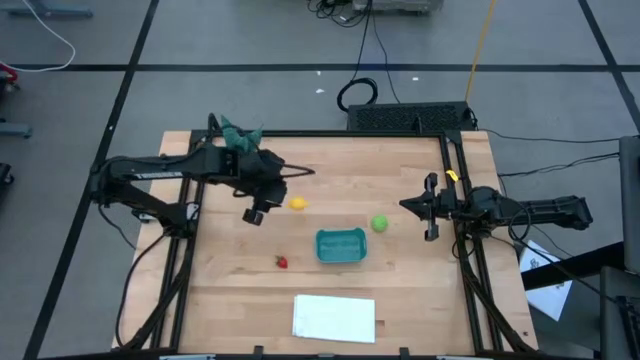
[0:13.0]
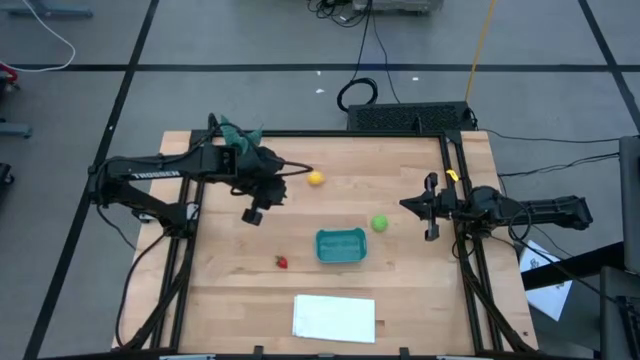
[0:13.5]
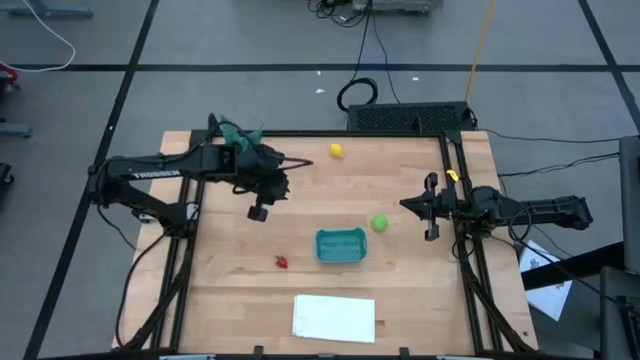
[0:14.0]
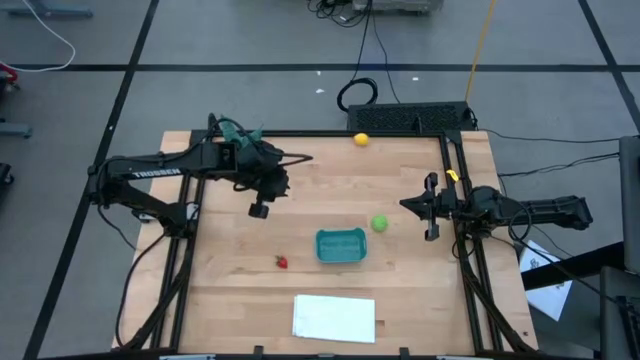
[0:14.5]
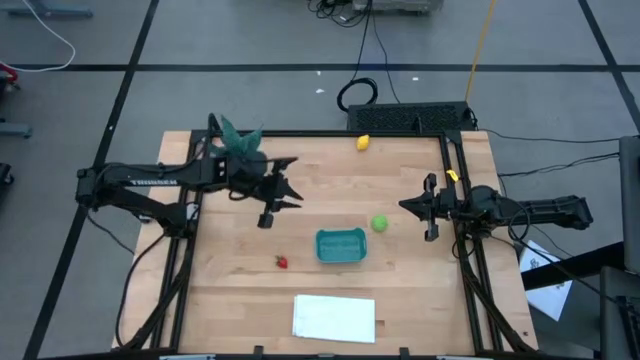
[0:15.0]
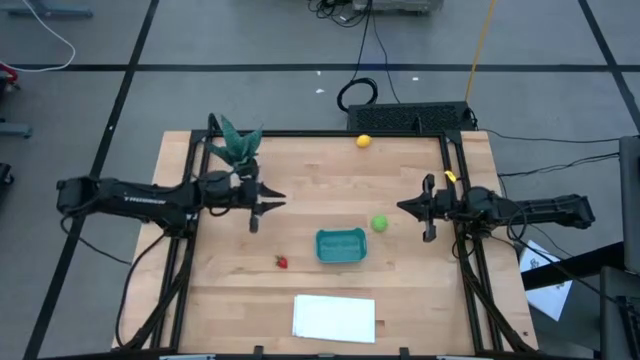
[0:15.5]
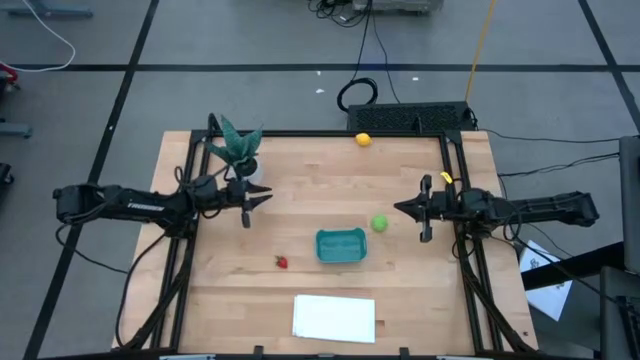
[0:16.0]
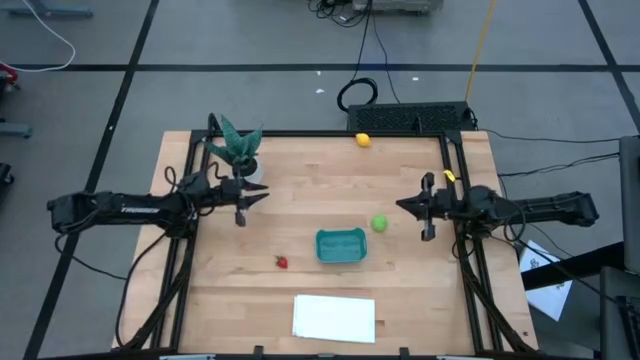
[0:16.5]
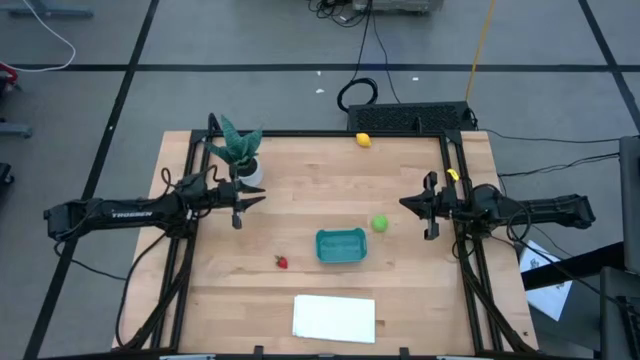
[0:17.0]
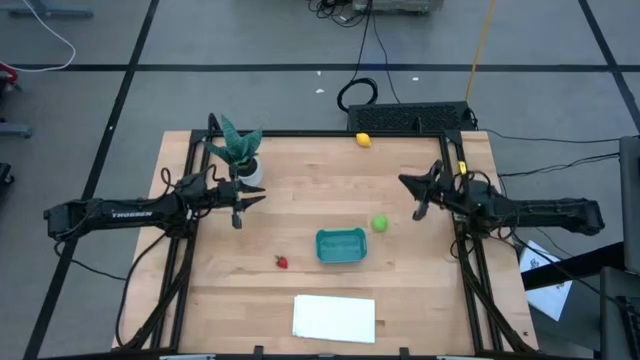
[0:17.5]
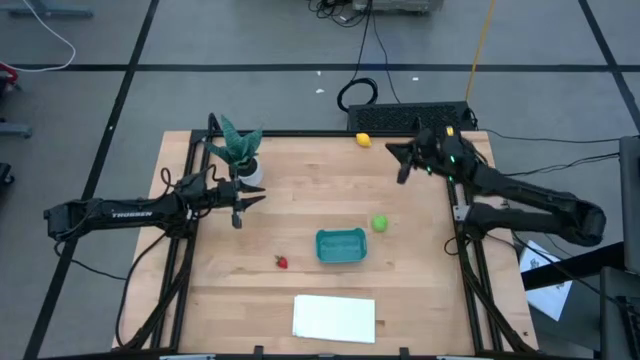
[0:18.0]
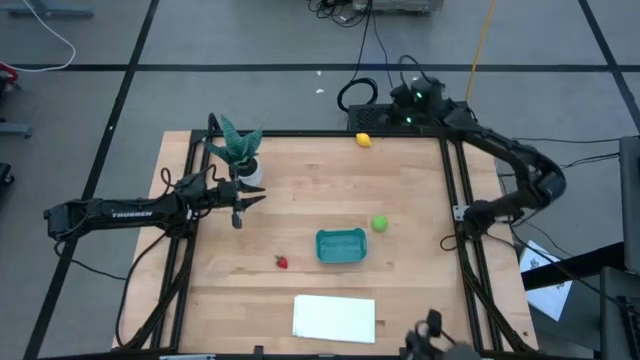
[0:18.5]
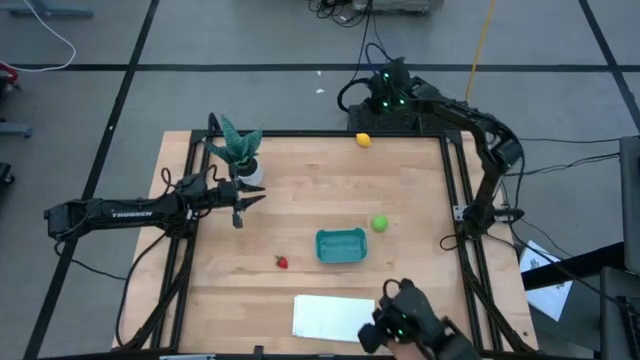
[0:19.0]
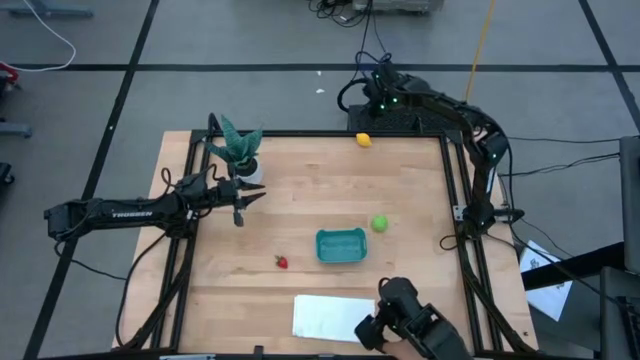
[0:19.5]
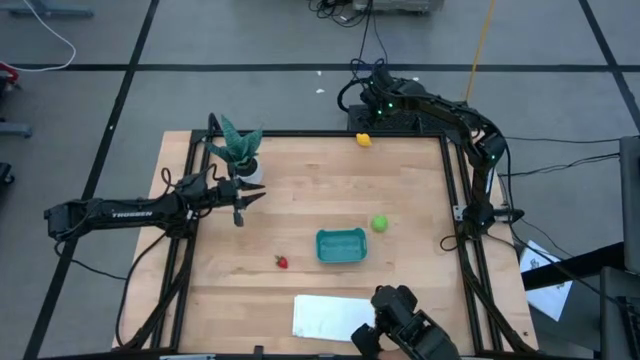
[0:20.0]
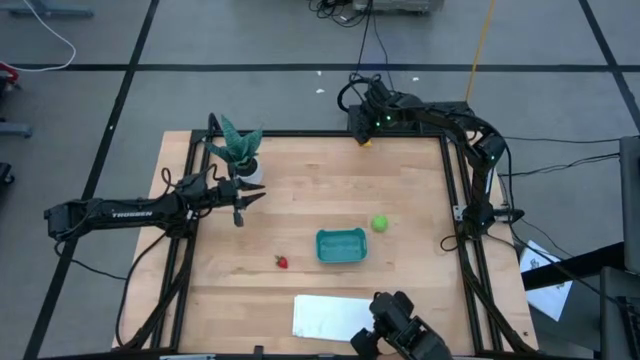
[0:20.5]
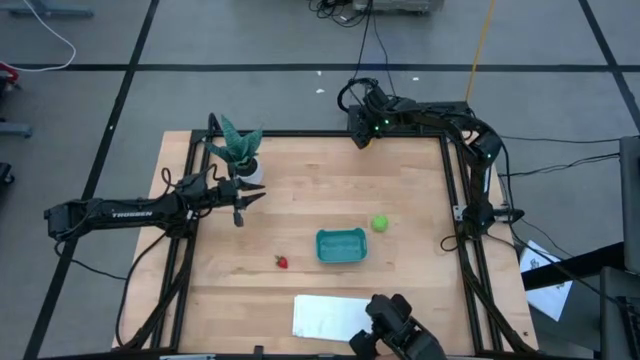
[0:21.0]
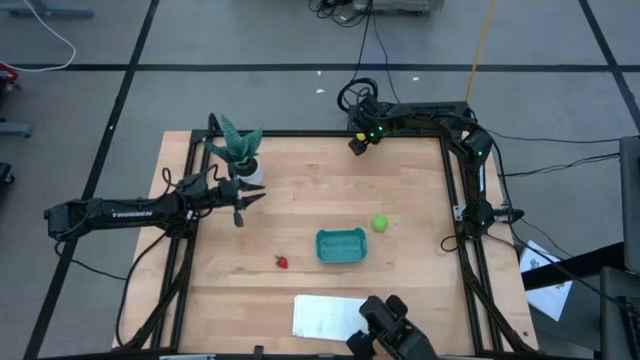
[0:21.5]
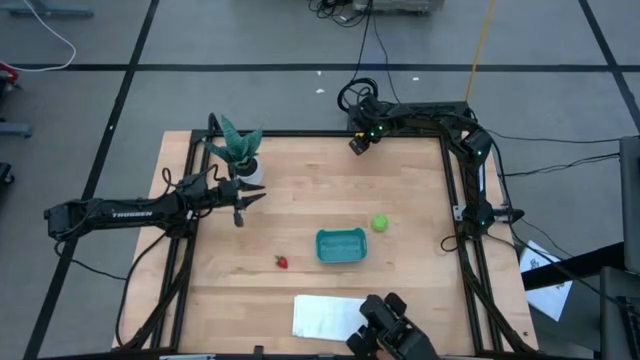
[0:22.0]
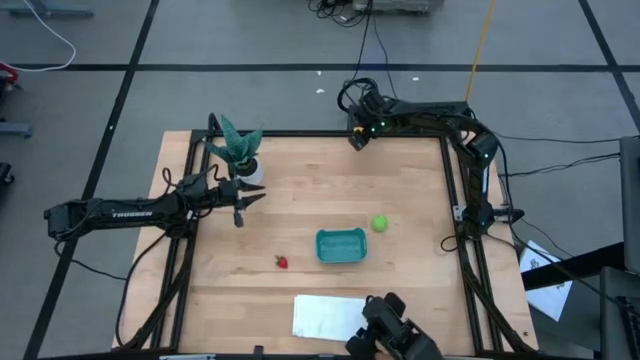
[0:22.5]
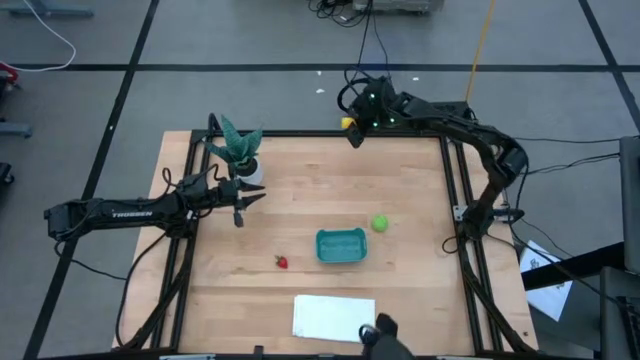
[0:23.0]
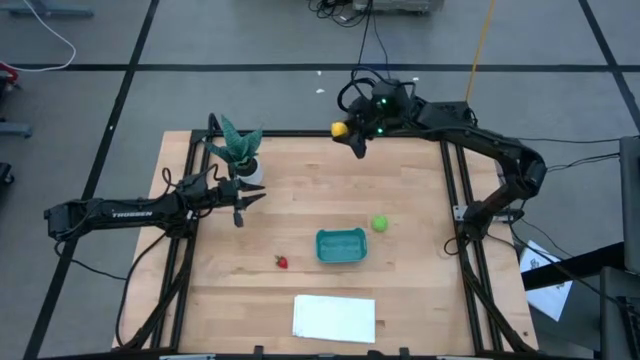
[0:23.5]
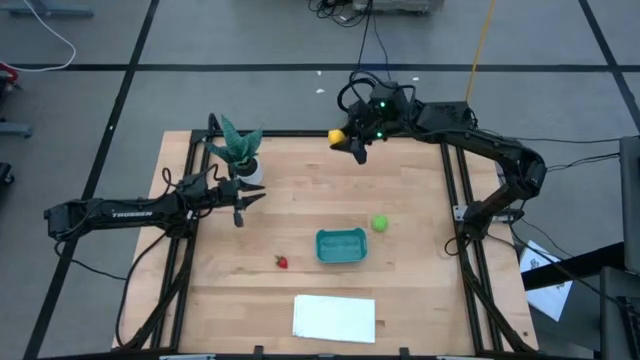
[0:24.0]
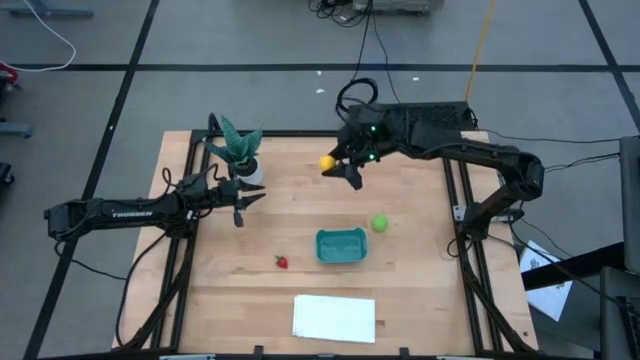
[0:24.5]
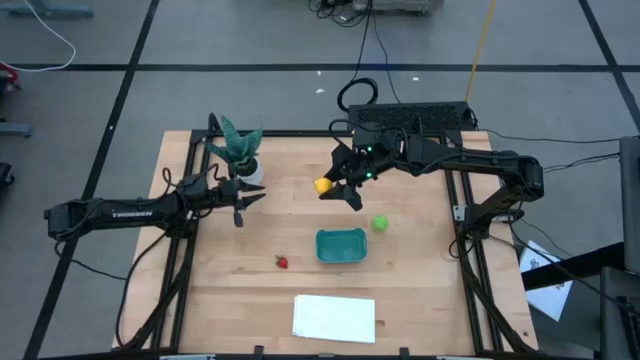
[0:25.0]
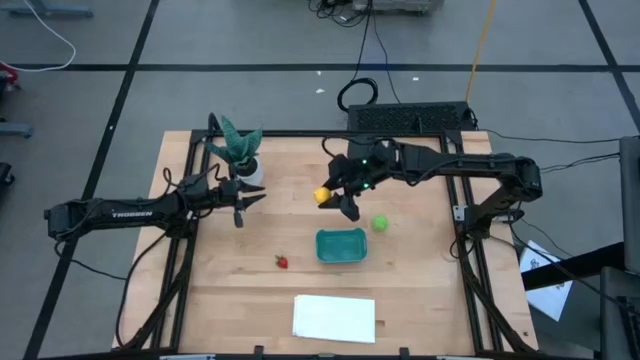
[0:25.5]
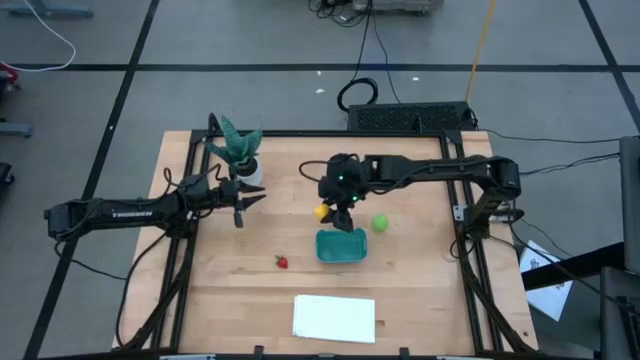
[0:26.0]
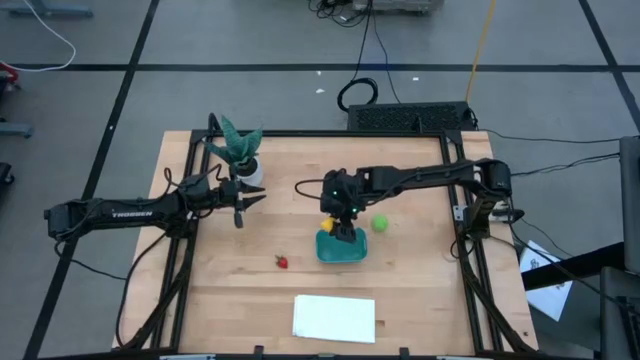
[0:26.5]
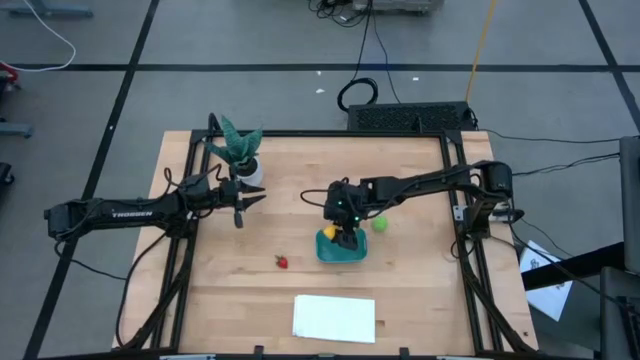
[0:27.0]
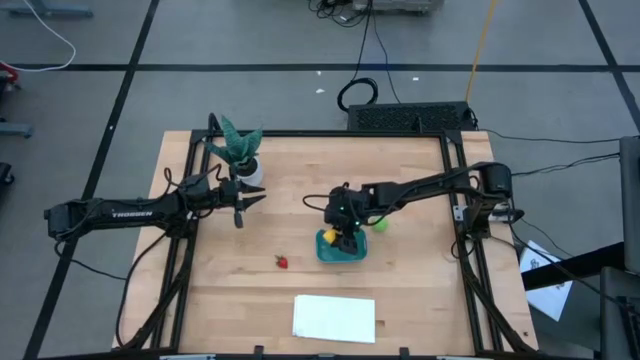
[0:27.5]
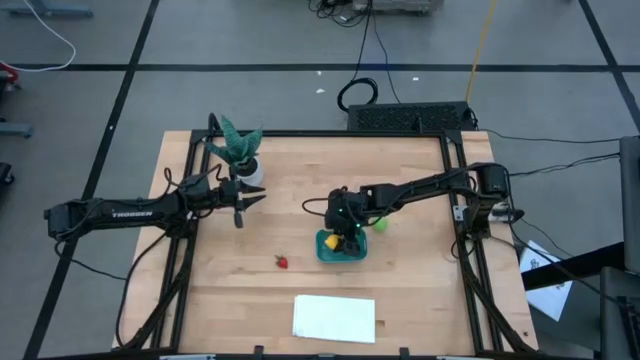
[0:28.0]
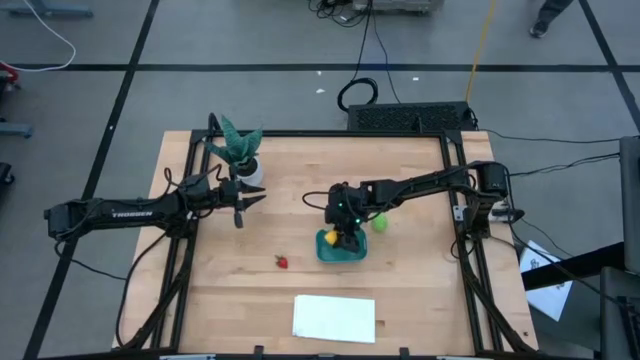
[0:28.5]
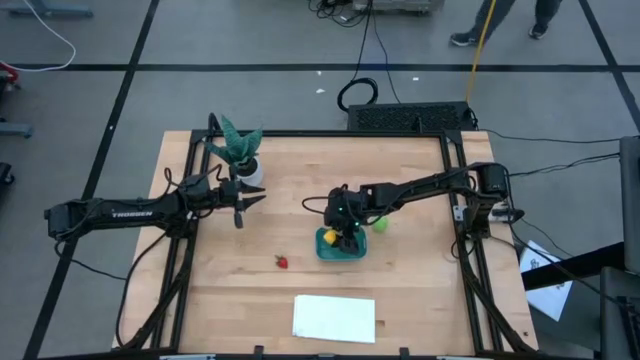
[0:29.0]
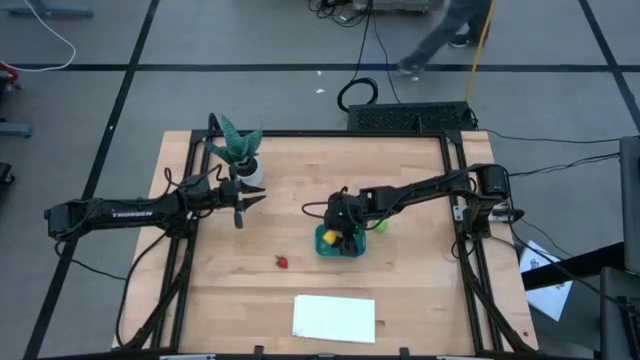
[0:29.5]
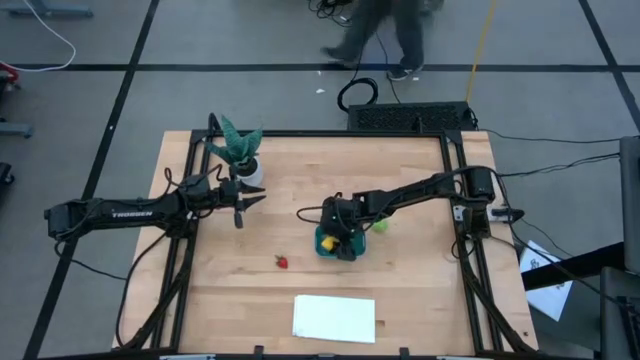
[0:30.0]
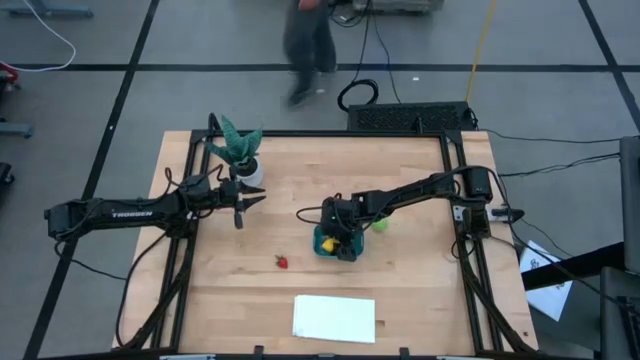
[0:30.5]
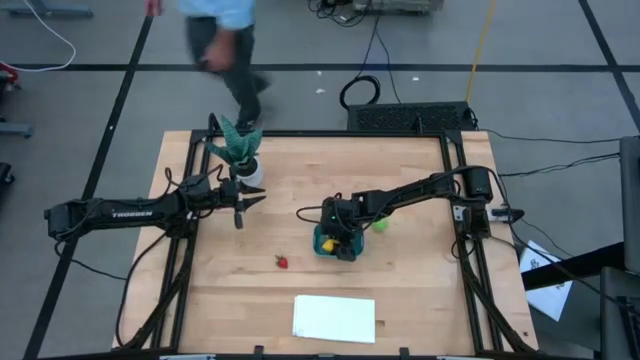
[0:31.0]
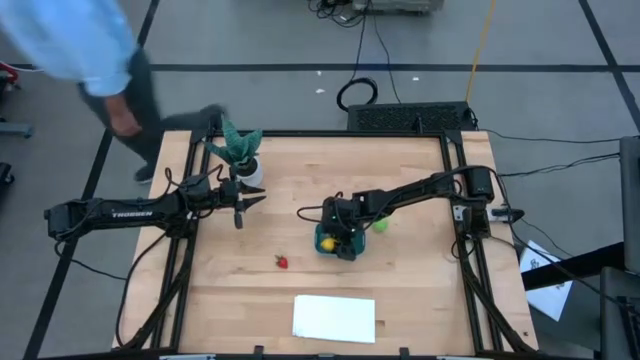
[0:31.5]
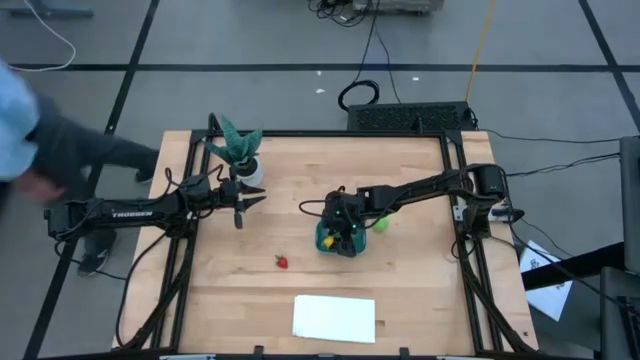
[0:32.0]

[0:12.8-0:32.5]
Task: Pick and placing Produce into tupperware
Put the yellow lemon into the blue bin
